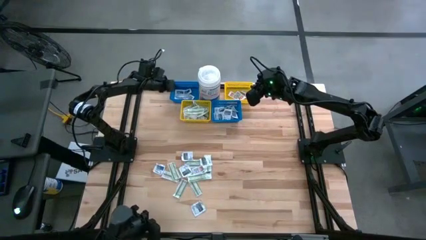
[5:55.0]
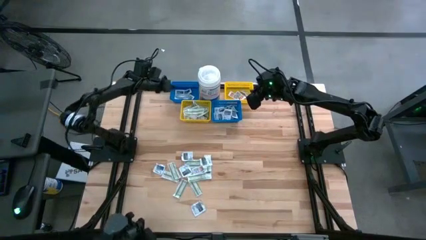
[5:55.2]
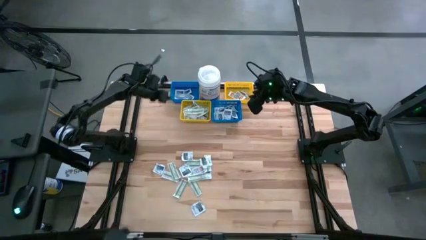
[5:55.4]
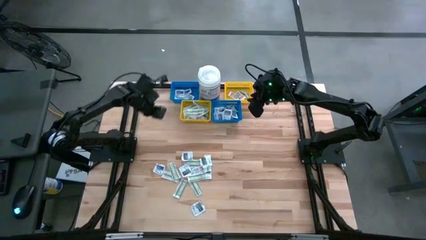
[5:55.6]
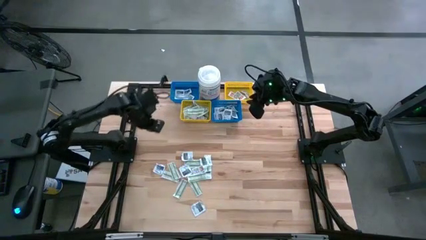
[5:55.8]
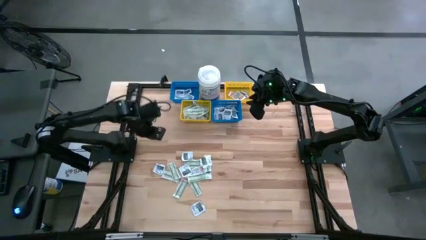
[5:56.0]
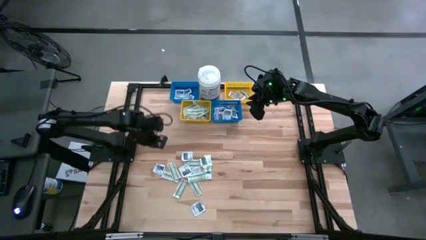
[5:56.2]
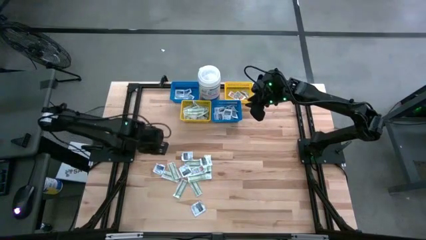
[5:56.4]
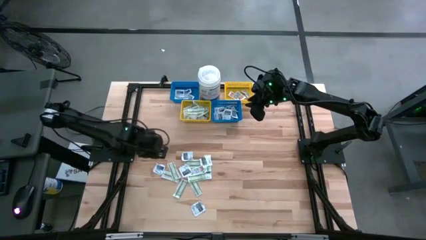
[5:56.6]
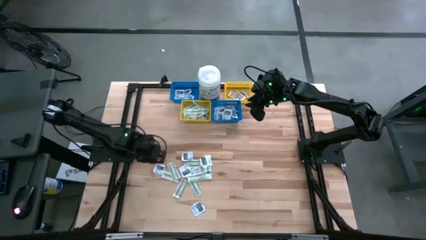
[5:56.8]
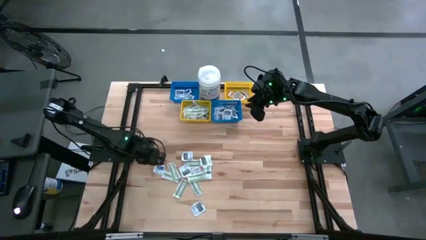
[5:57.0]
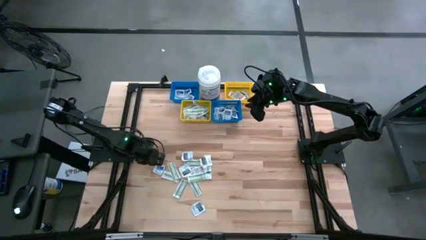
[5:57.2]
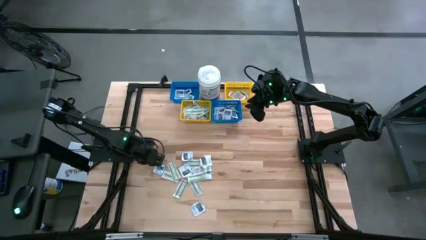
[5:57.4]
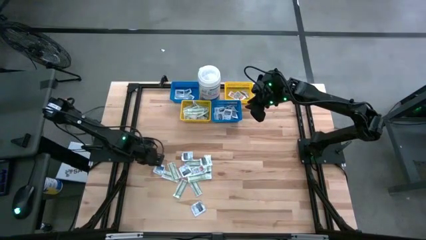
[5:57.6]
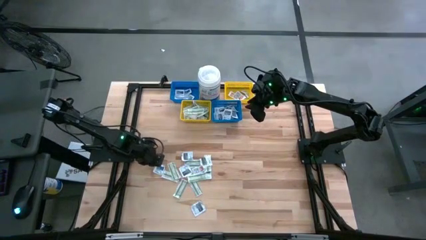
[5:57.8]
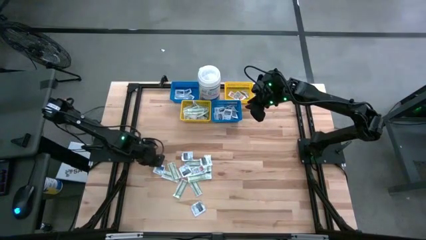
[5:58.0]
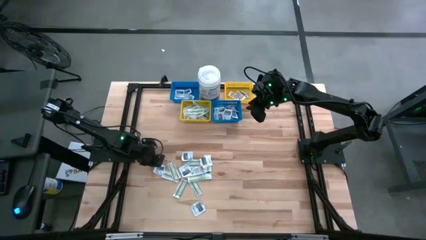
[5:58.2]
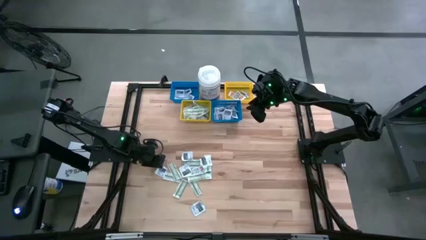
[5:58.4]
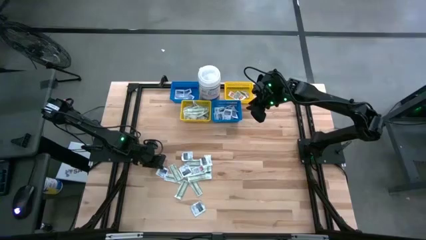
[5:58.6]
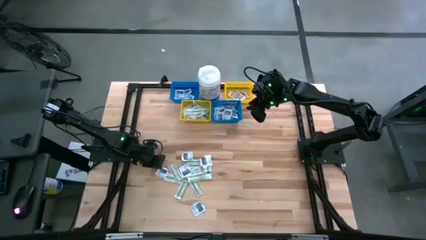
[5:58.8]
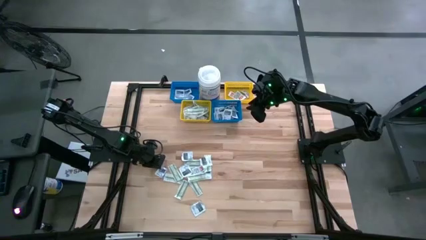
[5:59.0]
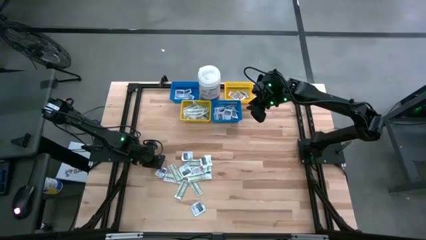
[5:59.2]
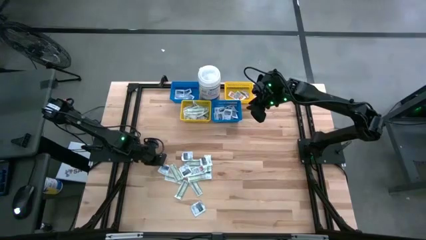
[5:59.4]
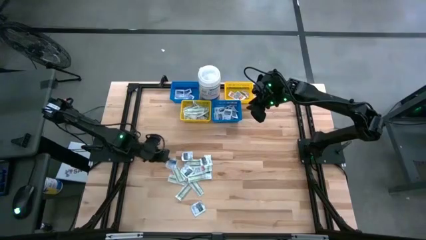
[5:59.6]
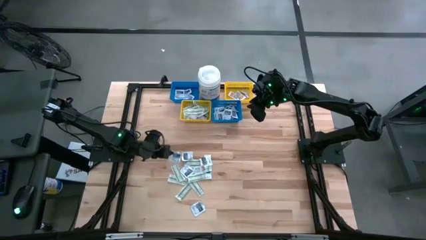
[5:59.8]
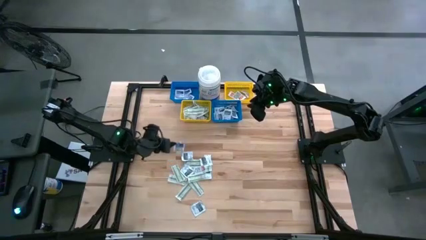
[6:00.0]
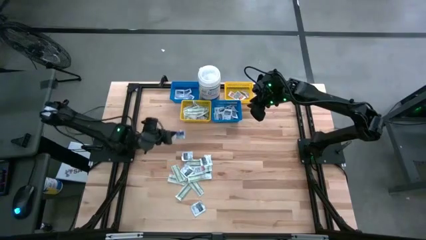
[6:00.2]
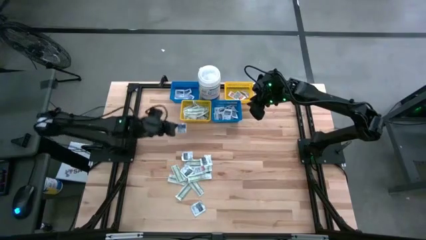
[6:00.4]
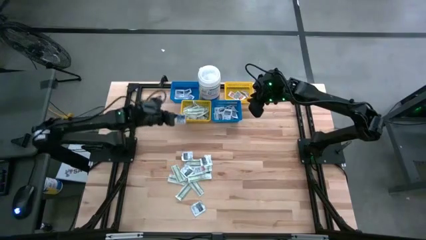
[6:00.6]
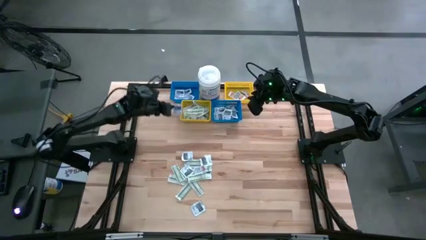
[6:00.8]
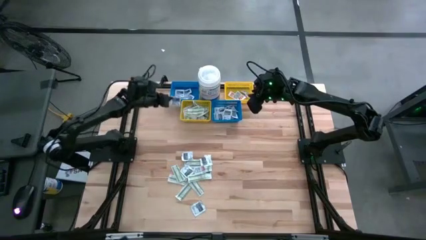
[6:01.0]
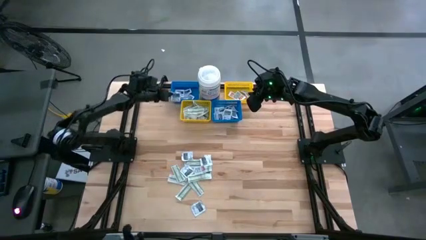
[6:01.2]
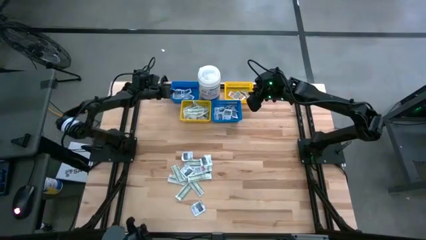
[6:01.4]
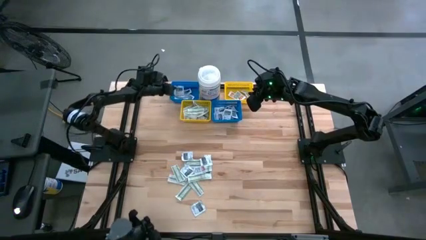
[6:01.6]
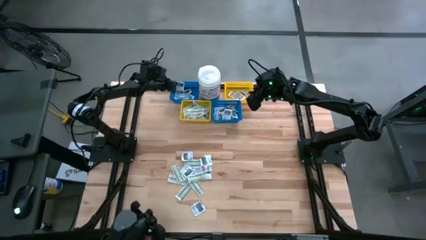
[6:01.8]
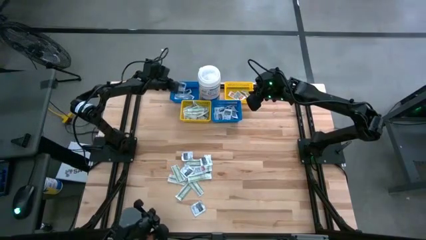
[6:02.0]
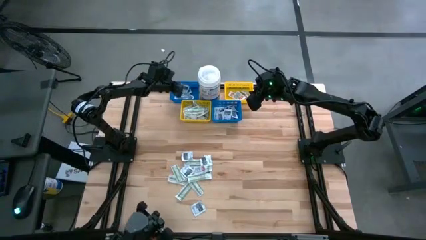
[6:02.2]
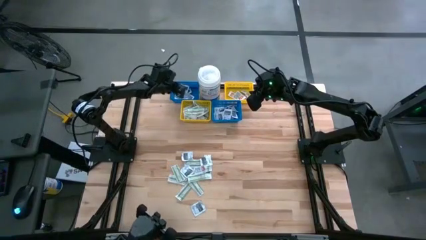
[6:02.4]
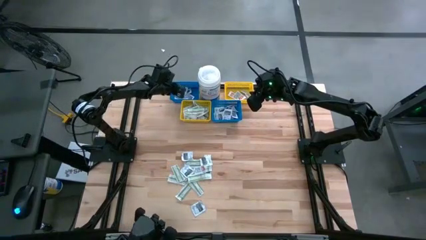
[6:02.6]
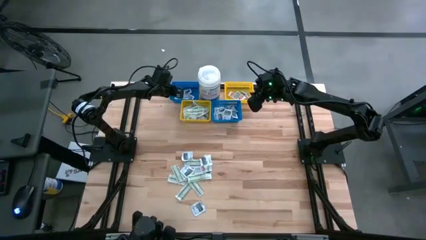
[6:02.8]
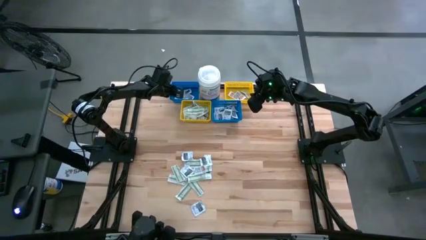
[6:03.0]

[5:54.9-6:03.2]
Task: Pick & Place First Aid Supplies
Put the blue alcohol pad into the left blue bin

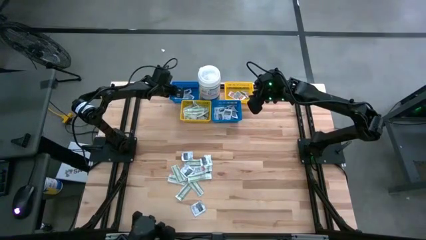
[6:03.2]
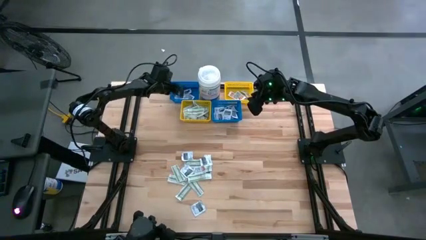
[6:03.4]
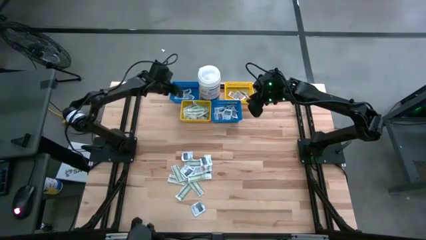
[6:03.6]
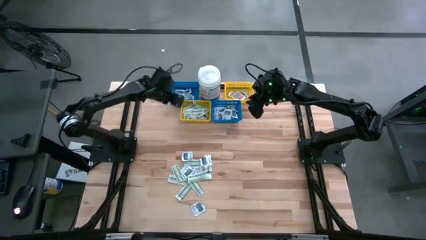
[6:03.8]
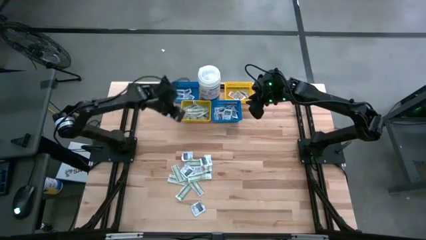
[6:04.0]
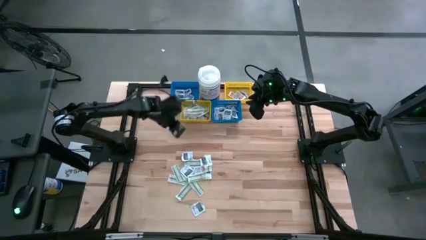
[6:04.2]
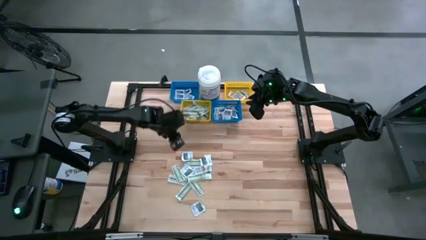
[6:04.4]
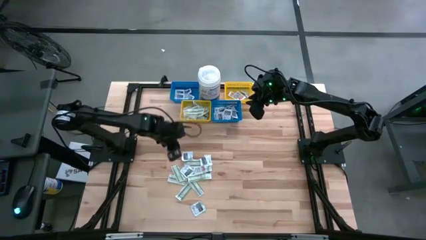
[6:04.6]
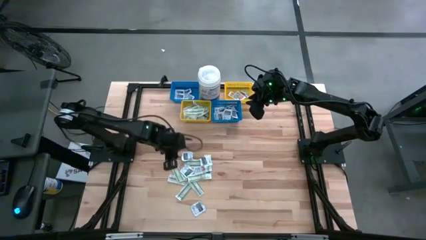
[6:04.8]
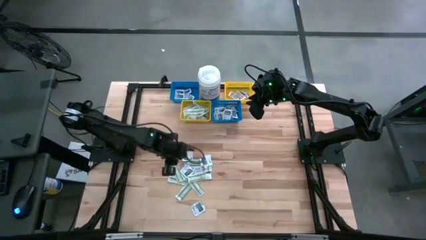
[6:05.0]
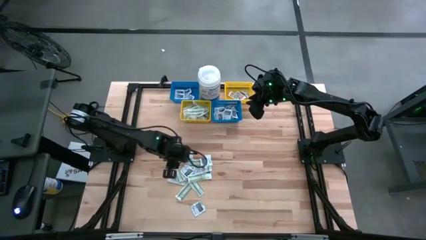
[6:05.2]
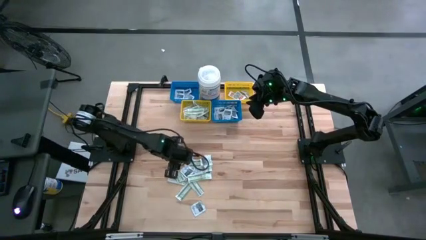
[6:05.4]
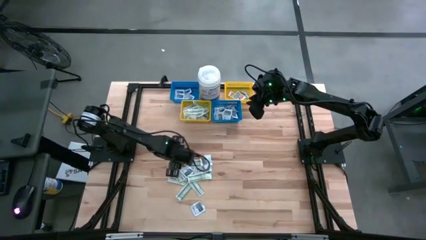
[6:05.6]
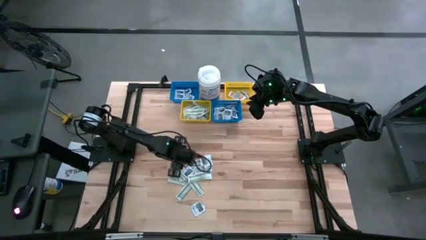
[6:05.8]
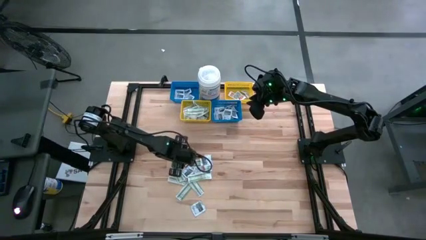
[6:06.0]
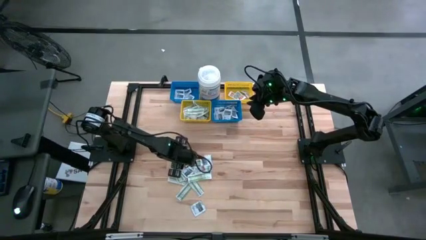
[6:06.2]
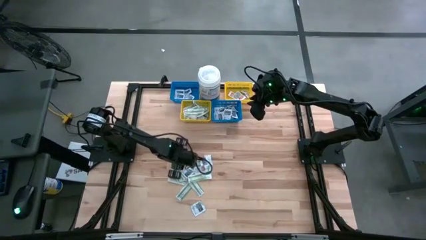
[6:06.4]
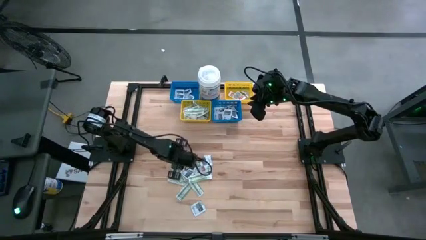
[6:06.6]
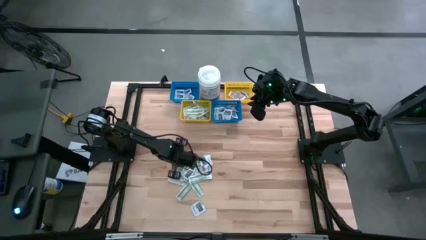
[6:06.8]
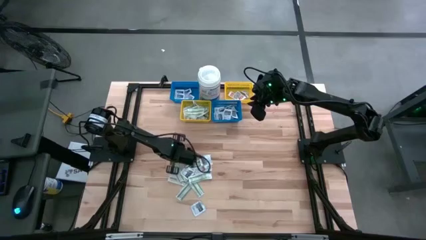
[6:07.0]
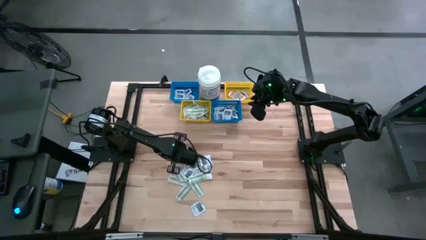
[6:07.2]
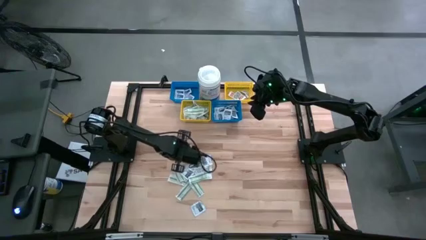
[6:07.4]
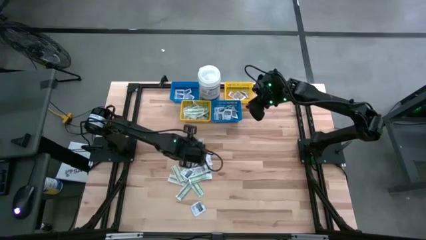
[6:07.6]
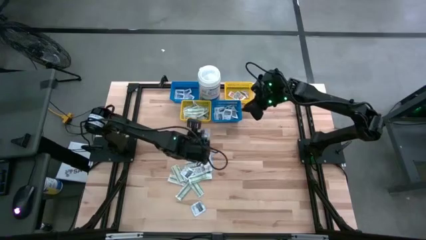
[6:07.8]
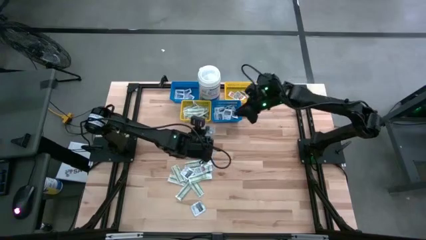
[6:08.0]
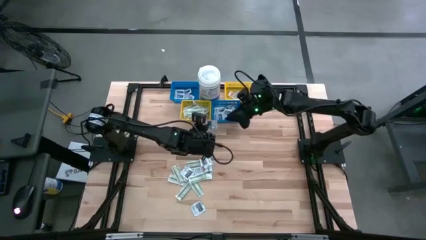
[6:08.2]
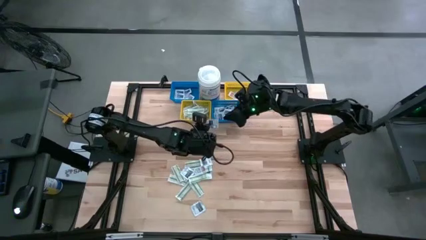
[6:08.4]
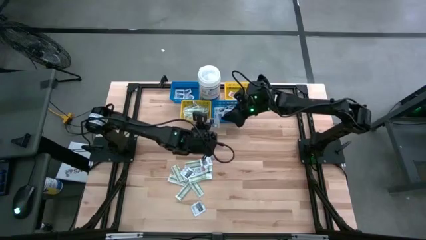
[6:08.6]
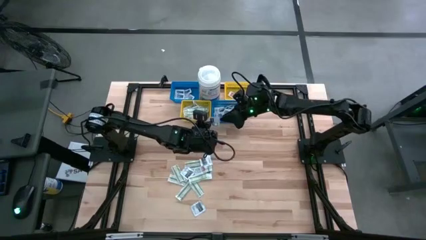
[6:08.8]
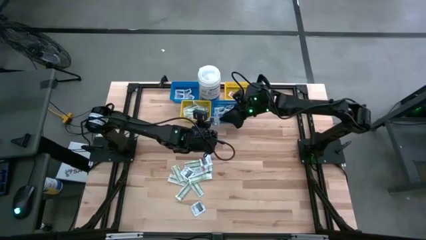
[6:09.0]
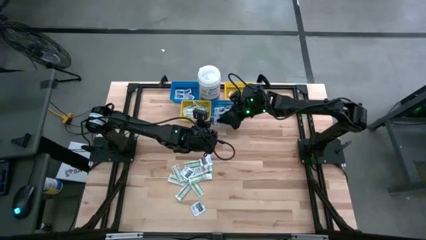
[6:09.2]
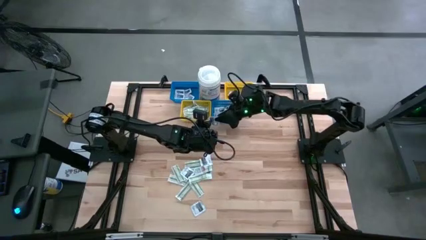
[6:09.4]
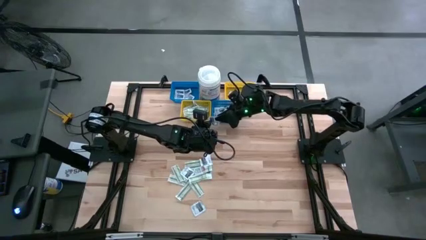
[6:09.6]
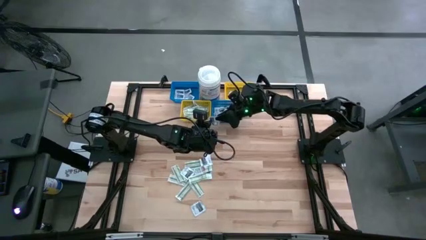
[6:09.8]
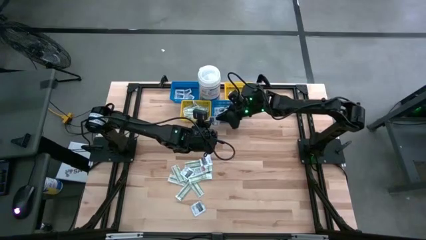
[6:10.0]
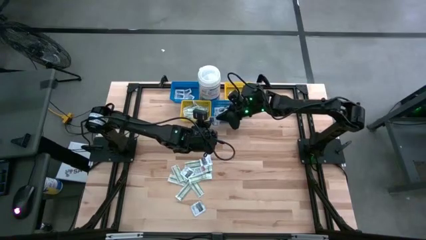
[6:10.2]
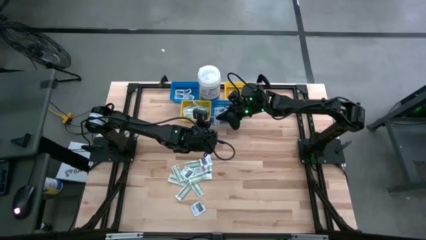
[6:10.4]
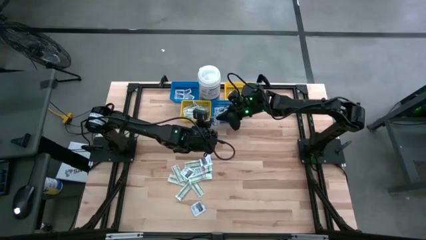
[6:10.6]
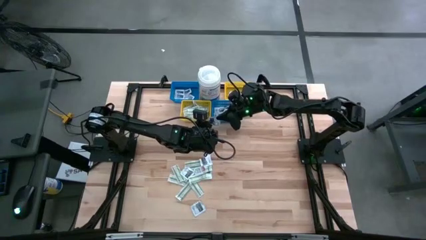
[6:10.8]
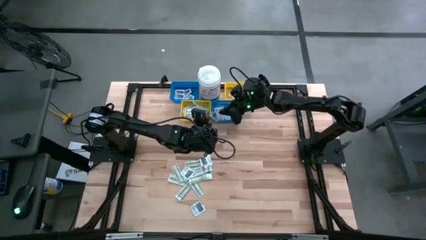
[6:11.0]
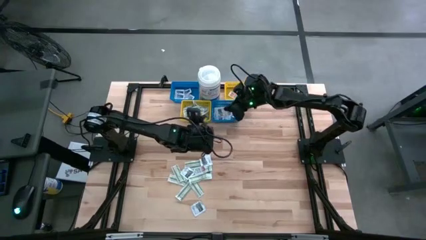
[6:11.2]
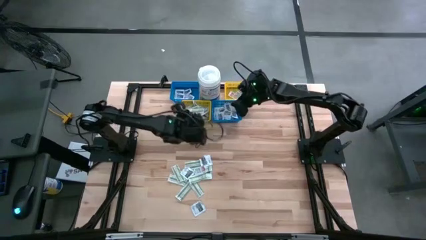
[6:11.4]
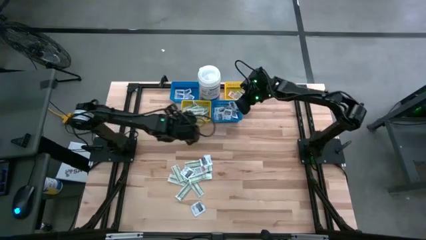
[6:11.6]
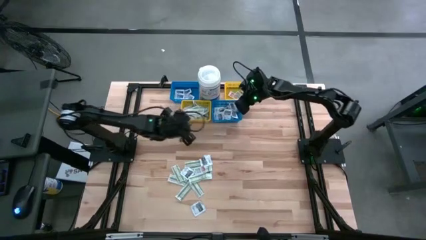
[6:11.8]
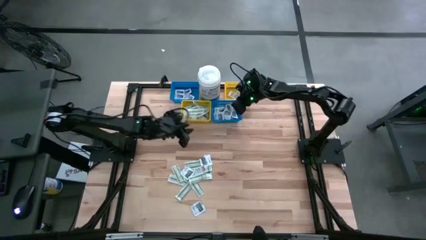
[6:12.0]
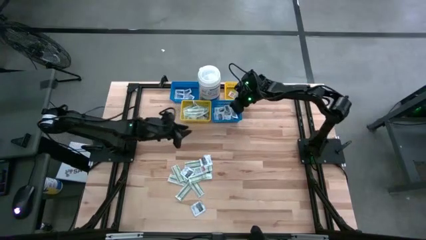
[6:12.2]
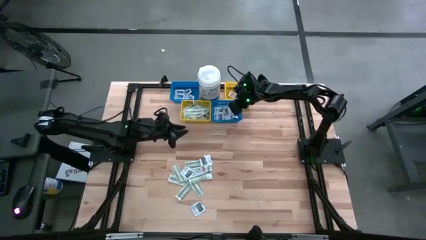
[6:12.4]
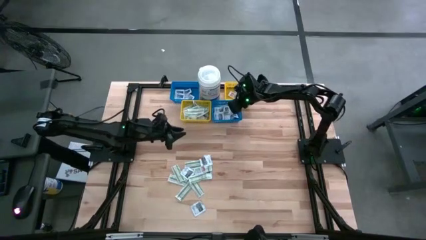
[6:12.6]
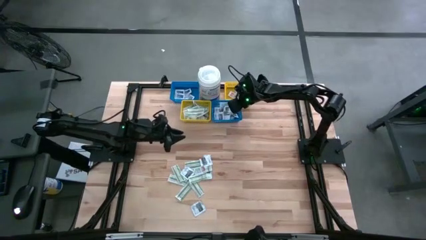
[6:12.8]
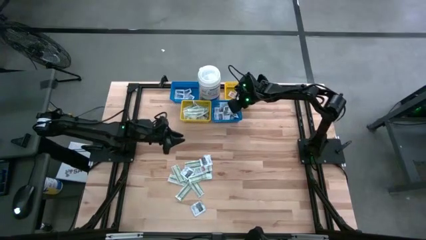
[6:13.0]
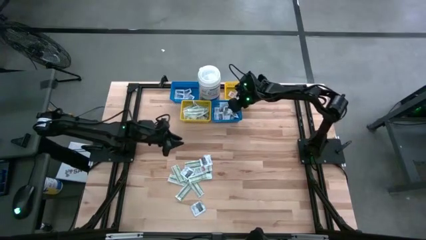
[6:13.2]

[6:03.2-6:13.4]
Put the black towelette pack into the right blue bin
